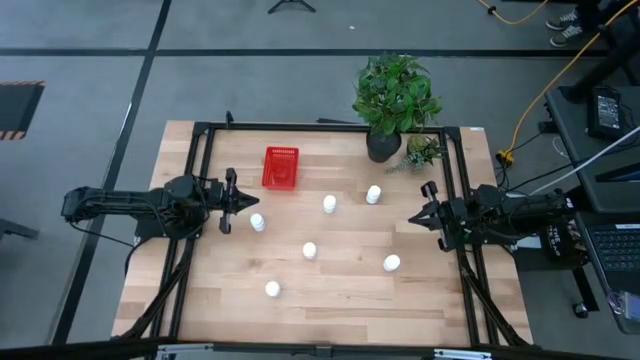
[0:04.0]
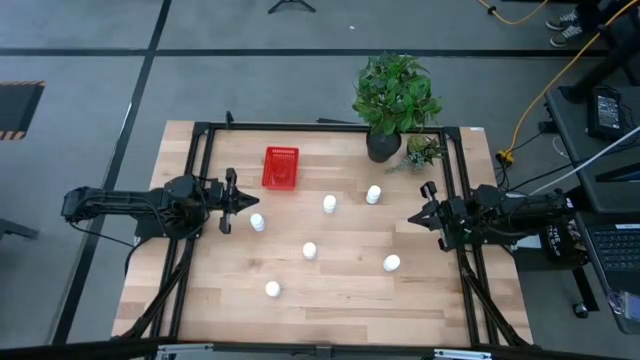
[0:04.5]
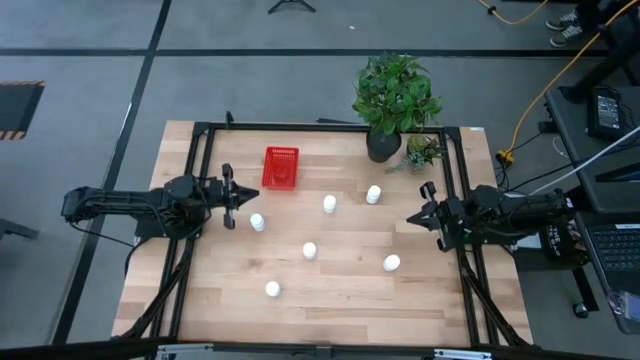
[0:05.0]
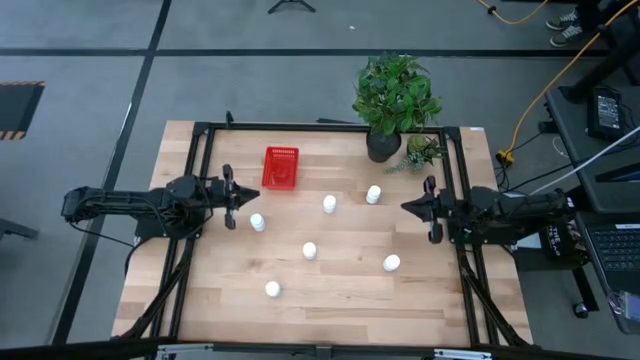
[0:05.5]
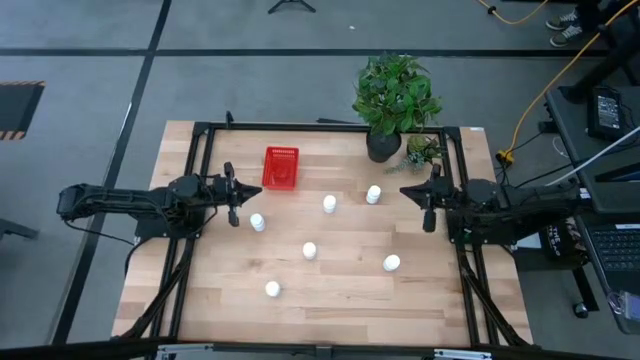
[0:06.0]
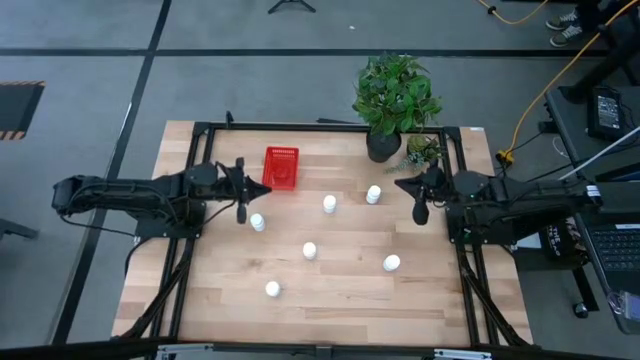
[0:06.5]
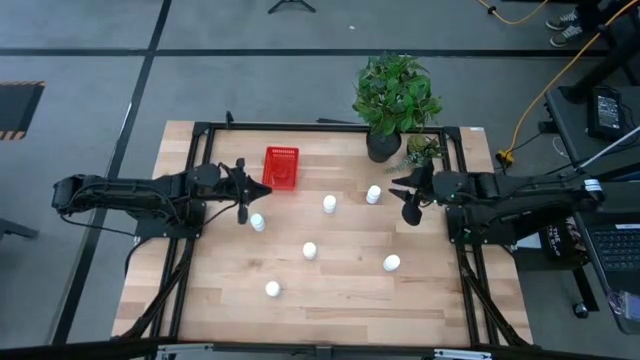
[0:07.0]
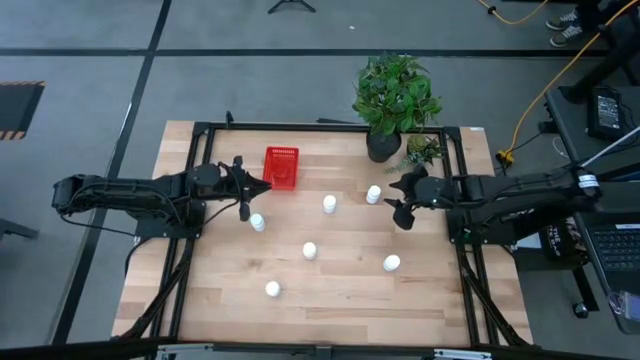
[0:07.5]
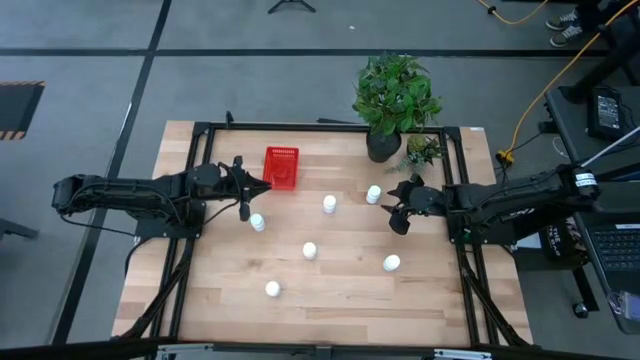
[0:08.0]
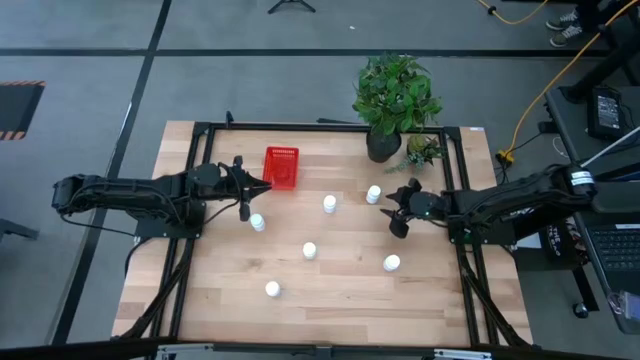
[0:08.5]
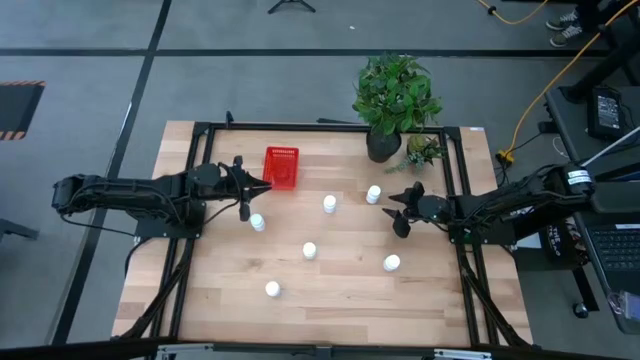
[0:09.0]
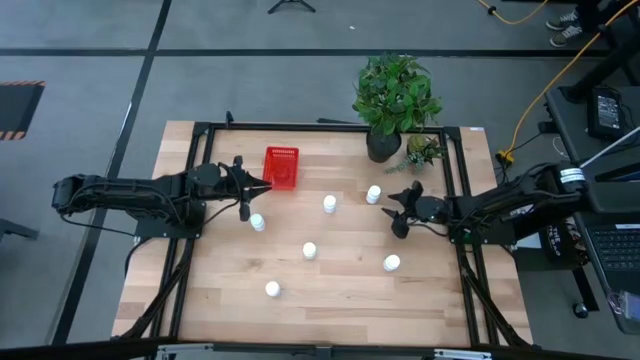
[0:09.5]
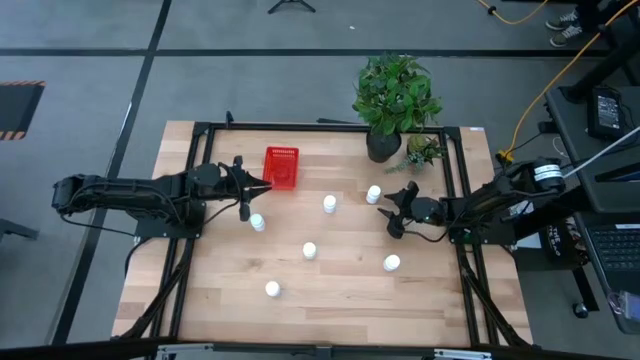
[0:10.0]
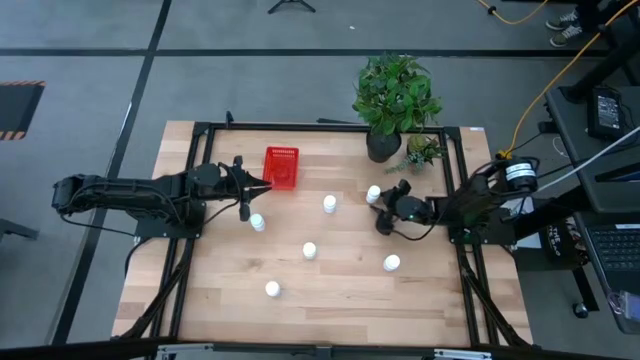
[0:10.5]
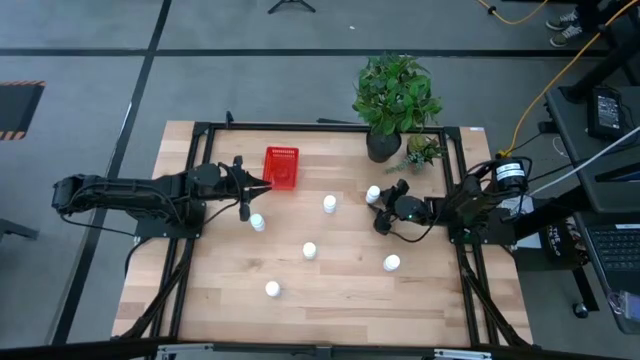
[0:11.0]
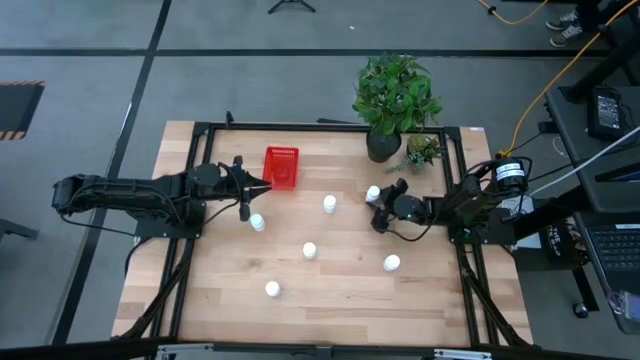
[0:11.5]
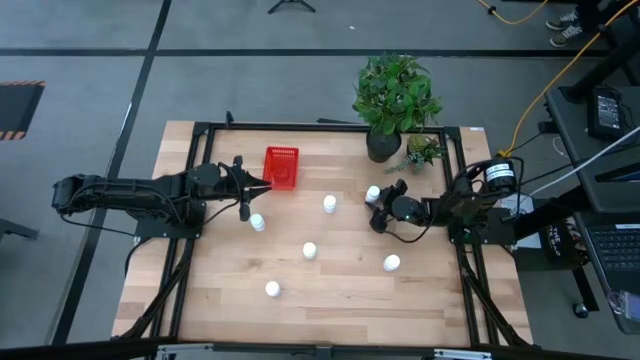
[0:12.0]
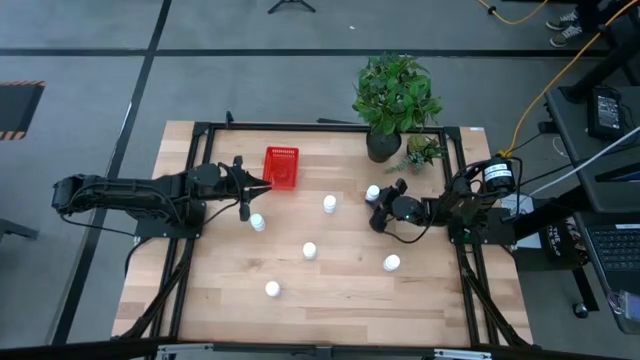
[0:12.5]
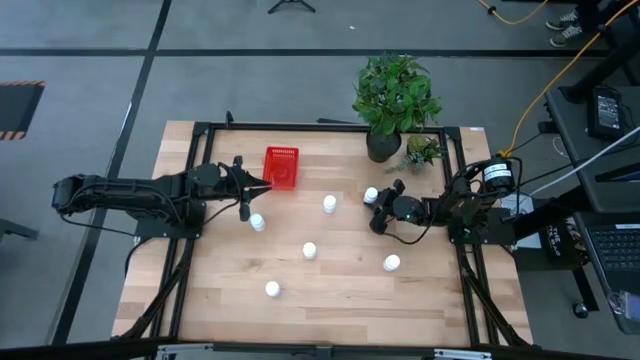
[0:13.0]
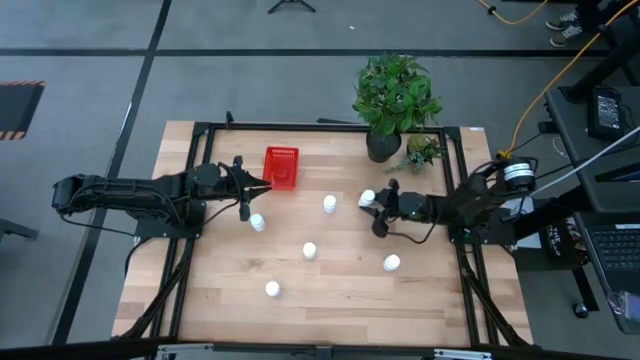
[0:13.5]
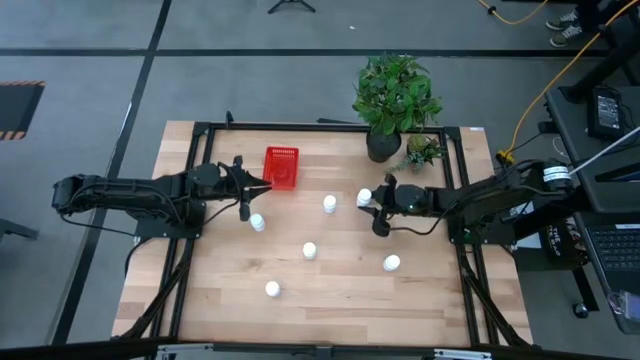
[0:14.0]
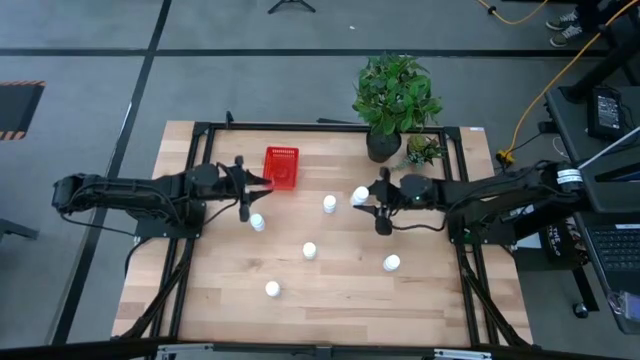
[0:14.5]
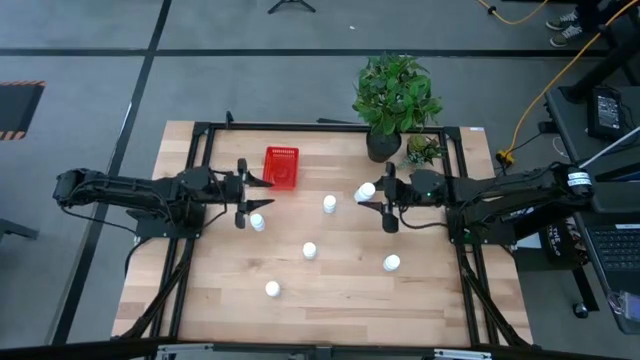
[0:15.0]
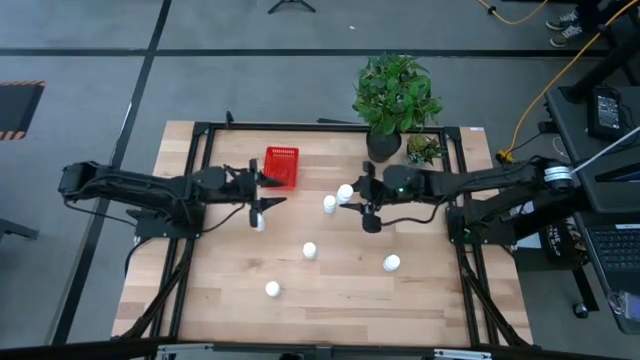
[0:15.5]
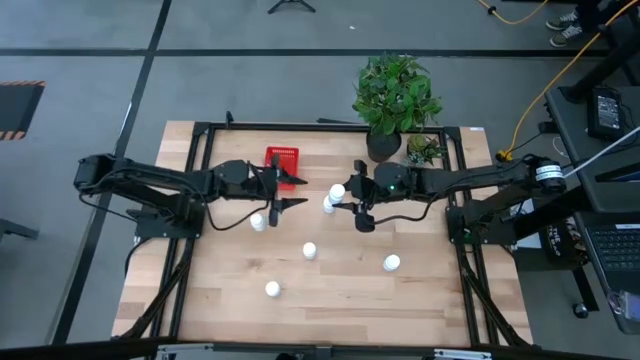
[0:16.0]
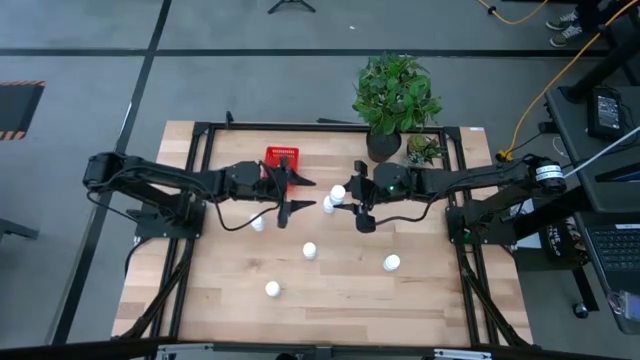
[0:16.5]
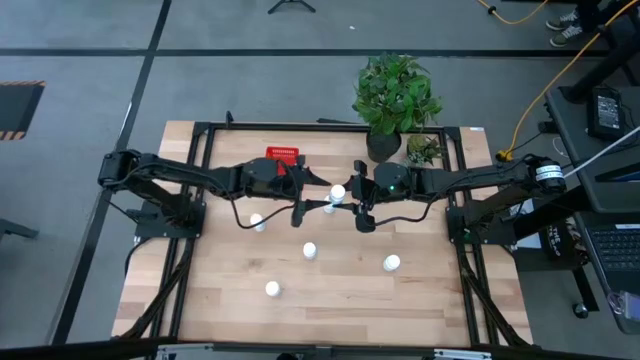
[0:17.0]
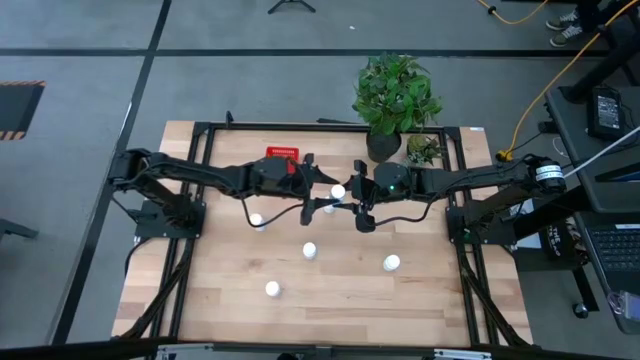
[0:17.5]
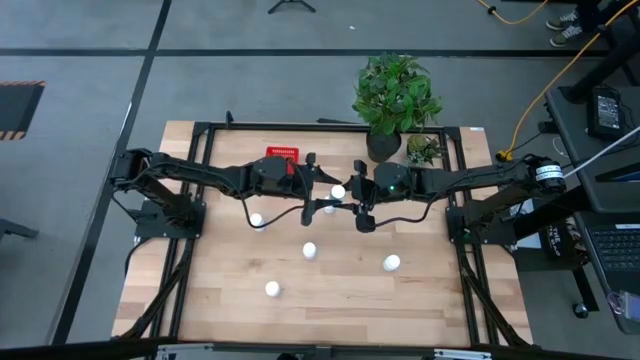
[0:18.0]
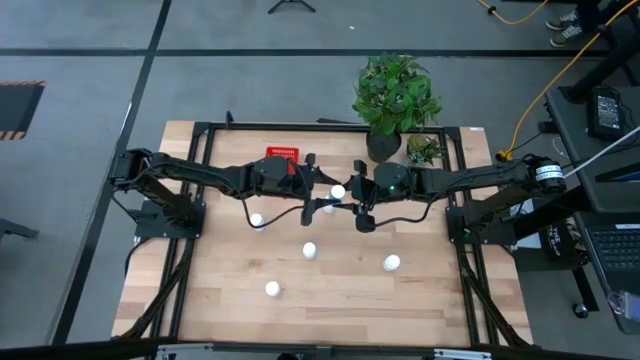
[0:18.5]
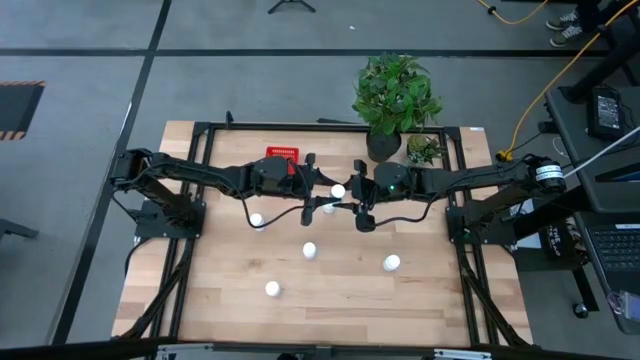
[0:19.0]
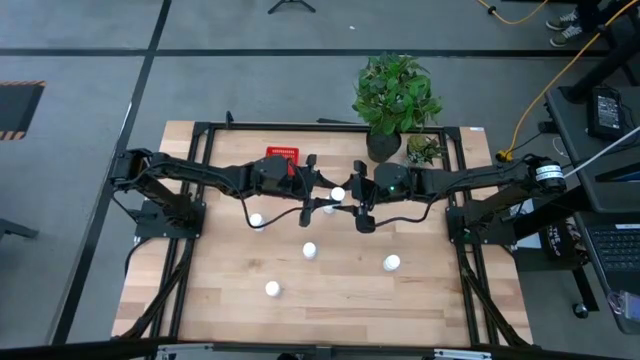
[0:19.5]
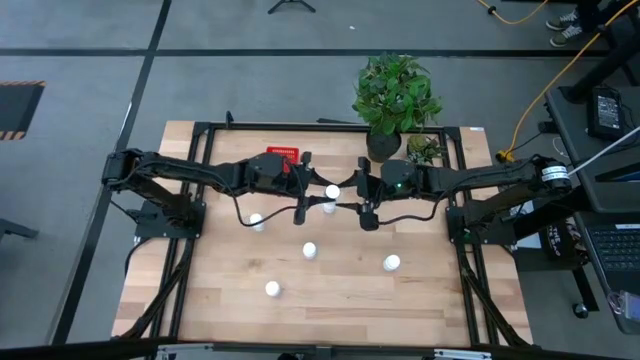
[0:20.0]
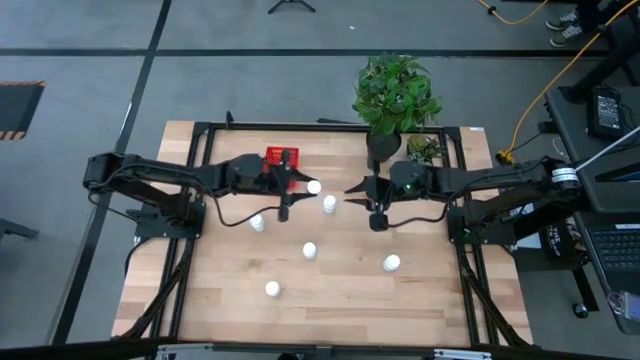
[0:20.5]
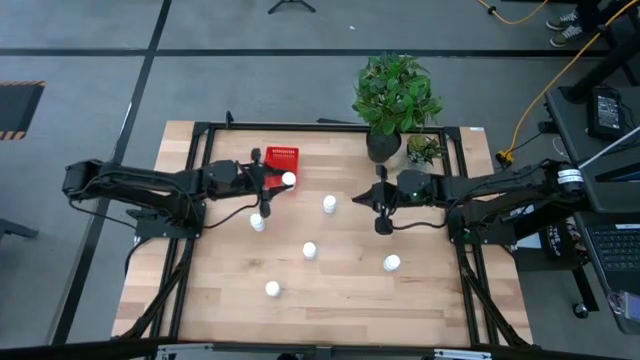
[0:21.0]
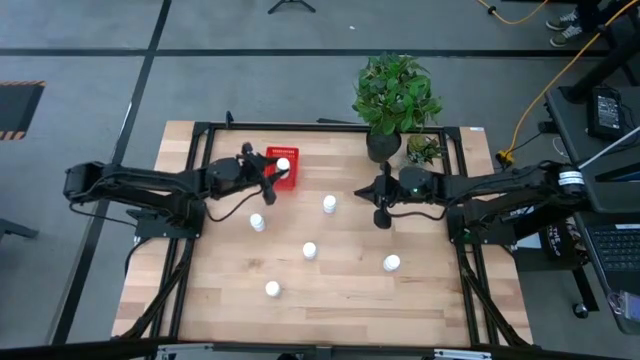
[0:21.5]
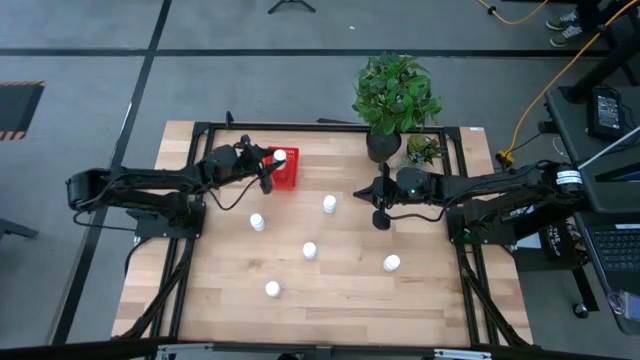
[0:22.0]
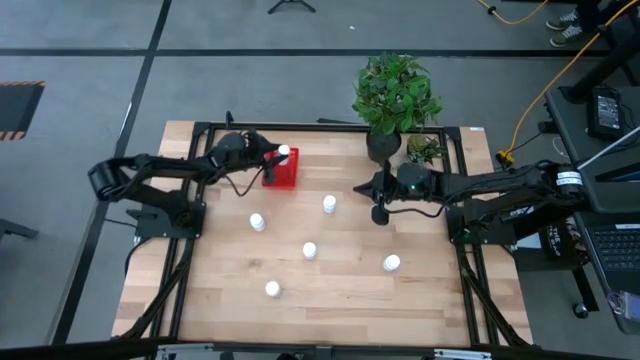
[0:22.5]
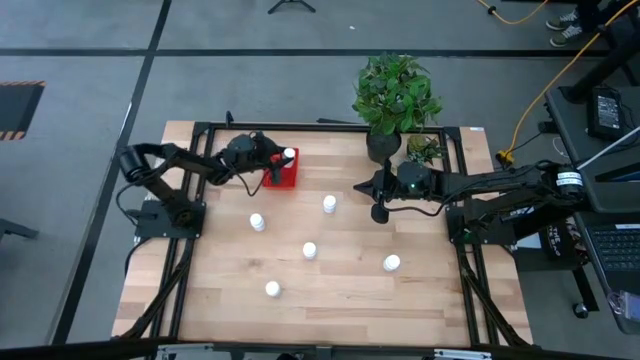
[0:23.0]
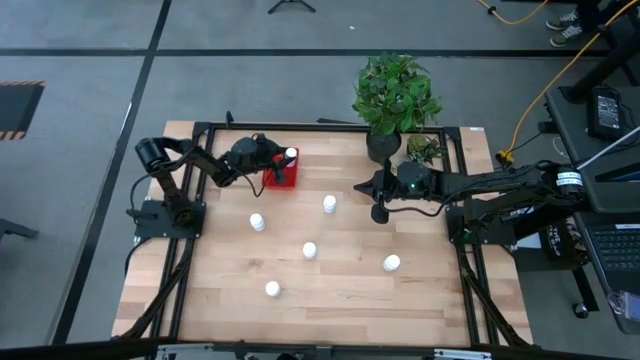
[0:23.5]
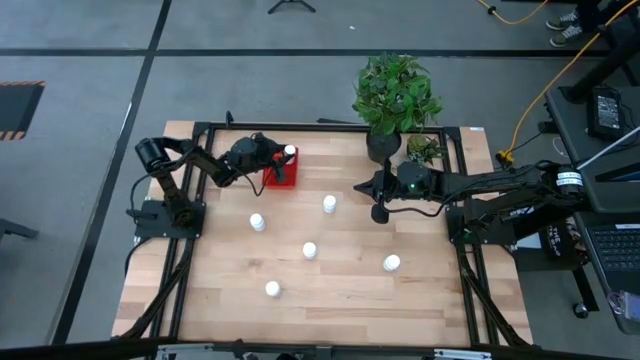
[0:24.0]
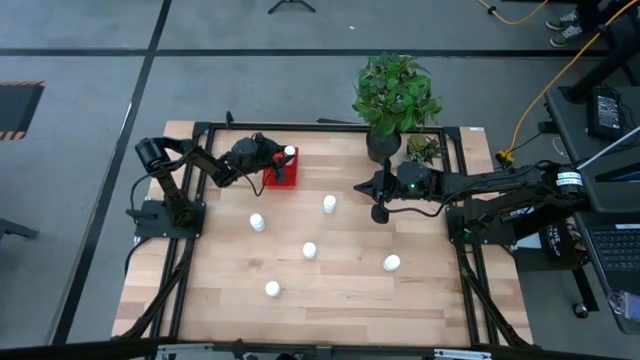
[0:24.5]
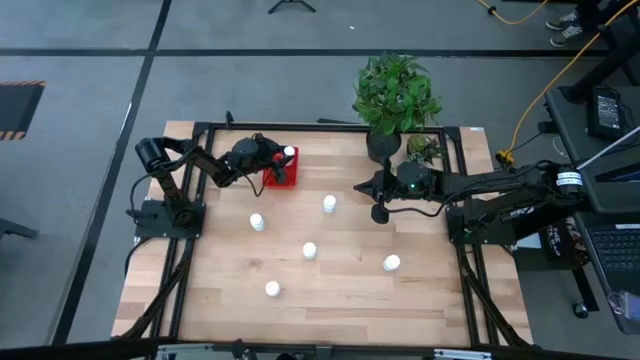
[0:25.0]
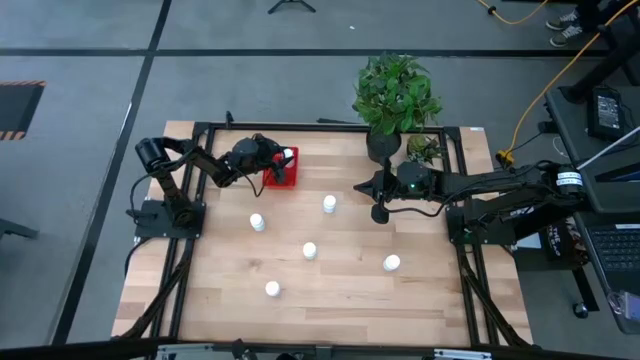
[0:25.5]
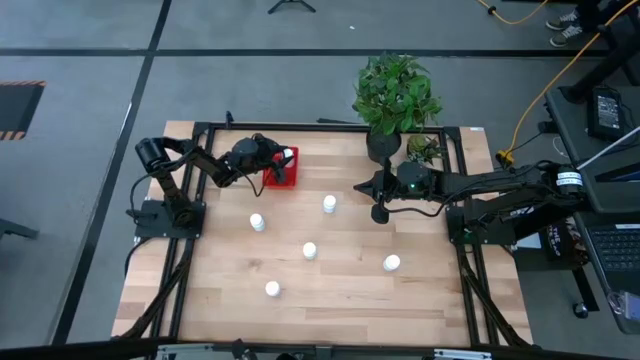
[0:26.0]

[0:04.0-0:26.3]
Task: Pick and place pill bottles into a basket
Put the white pill bottle into the red bin
